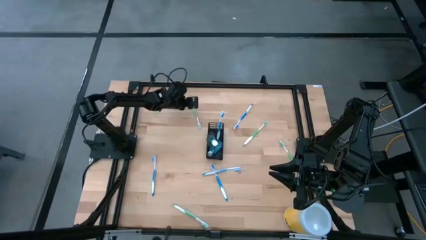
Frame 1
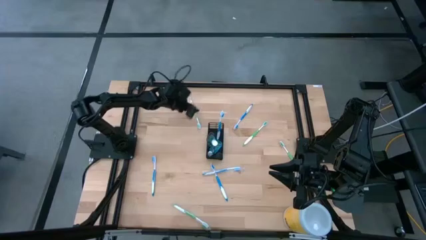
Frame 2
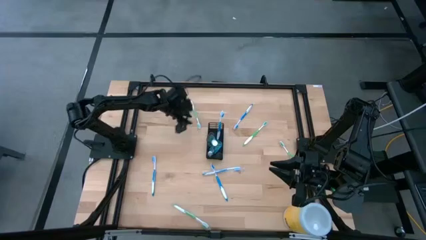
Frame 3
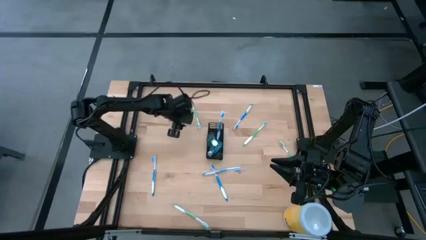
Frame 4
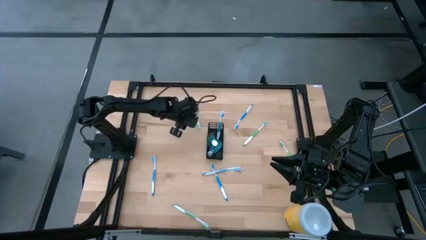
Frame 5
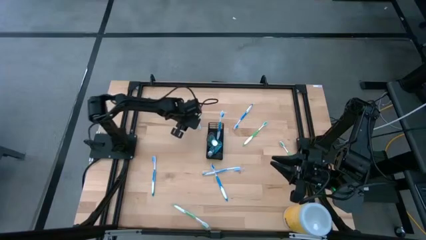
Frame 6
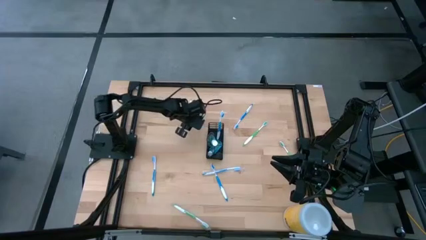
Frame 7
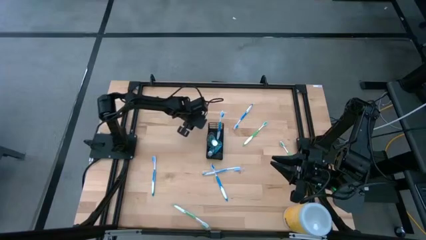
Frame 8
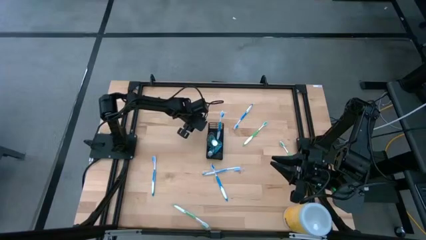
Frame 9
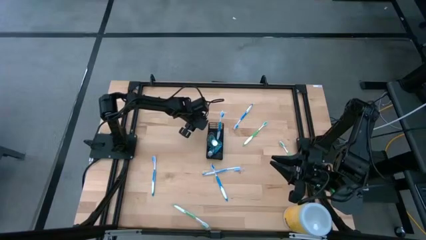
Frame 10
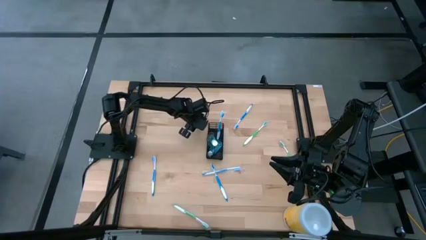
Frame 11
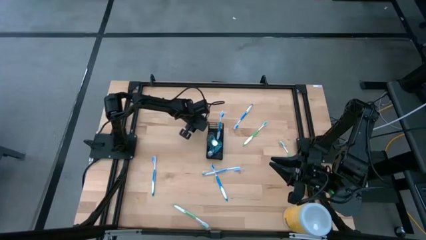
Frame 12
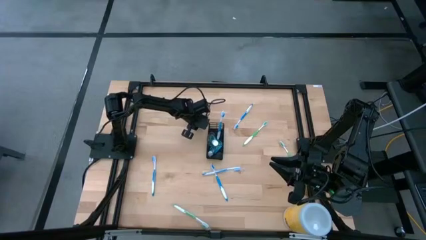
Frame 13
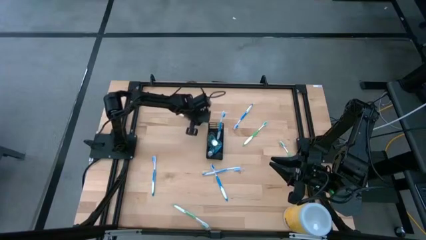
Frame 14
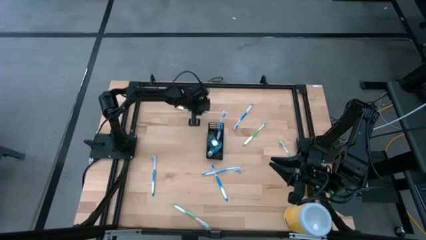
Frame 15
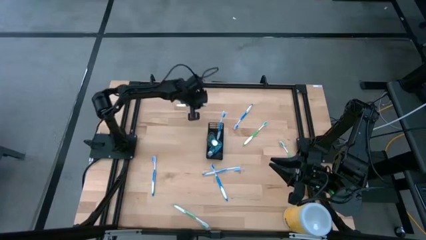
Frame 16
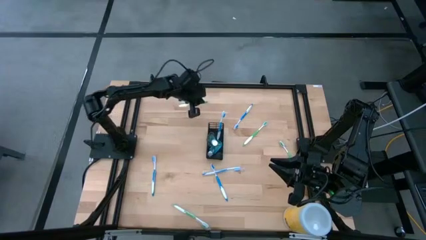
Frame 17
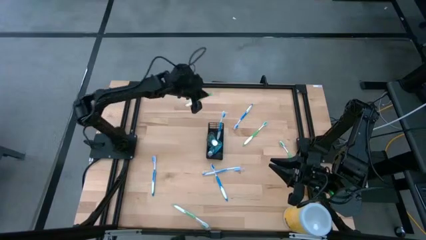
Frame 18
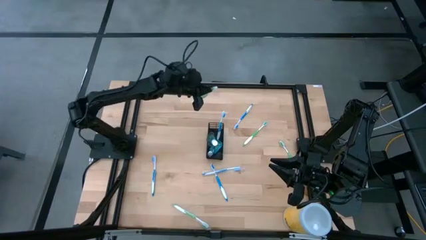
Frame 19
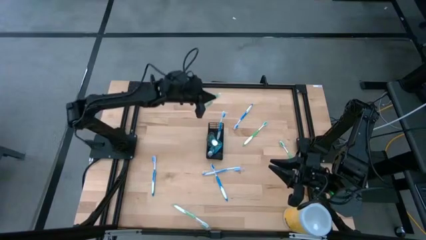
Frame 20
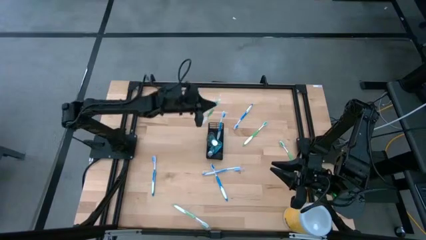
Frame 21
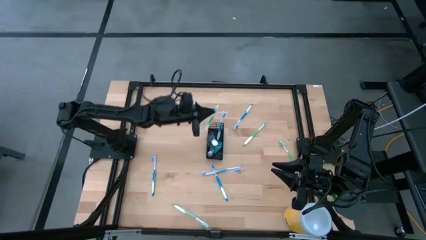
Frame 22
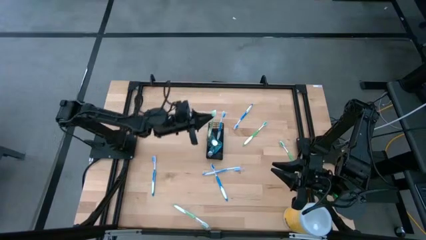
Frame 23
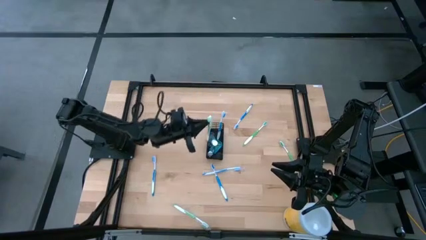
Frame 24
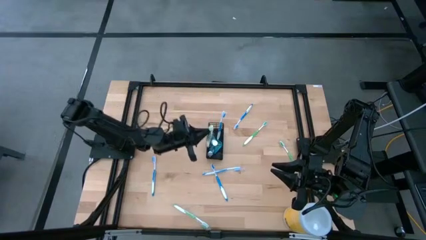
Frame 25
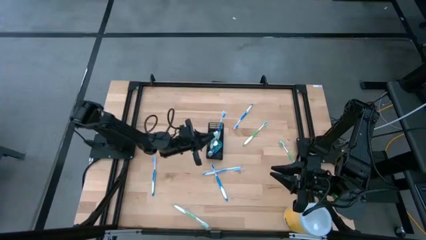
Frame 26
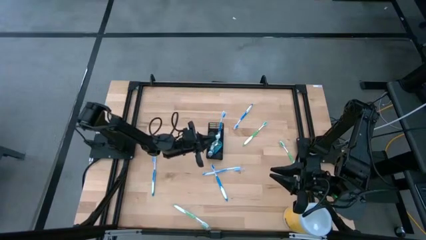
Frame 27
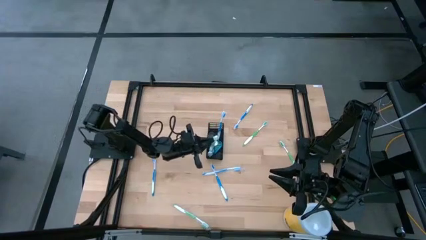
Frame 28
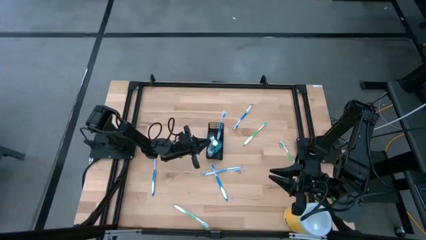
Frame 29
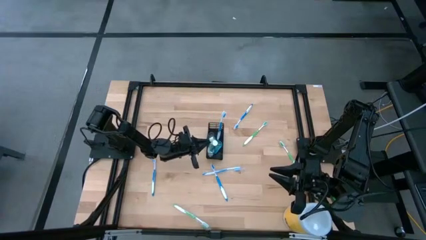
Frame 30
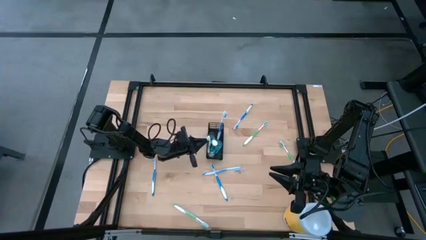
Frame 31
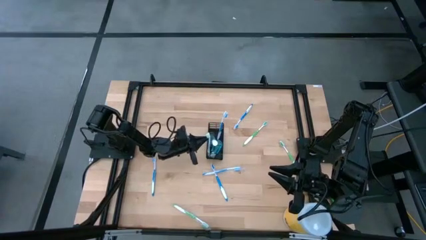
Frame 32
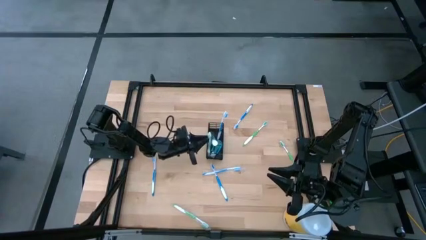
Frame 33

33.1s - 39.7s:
Task: Pick & Place toothbrushing station
Put the green toothbrush into the black organizer

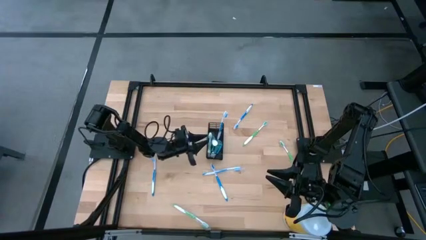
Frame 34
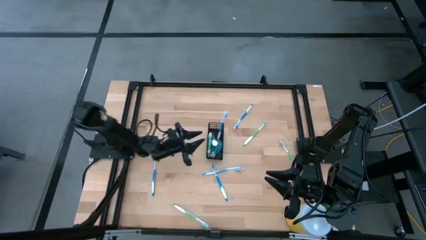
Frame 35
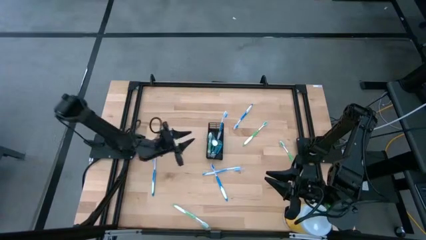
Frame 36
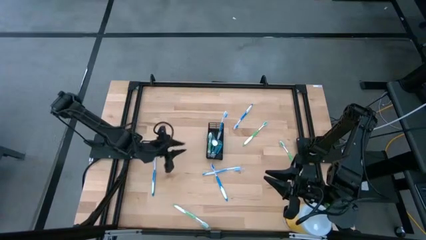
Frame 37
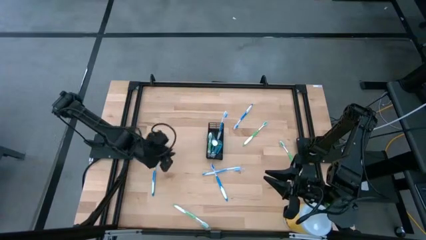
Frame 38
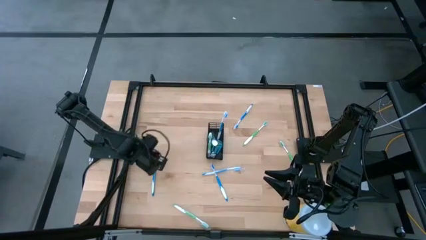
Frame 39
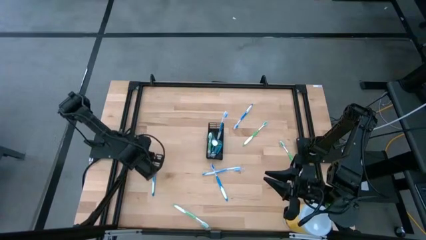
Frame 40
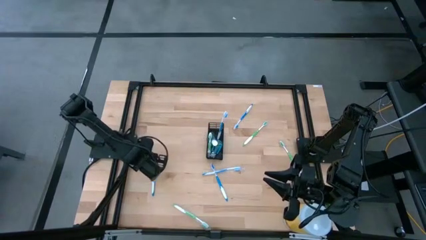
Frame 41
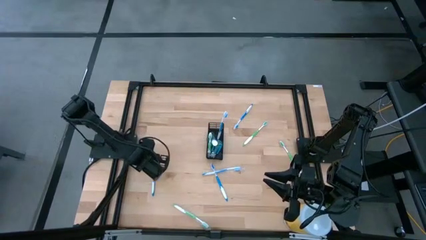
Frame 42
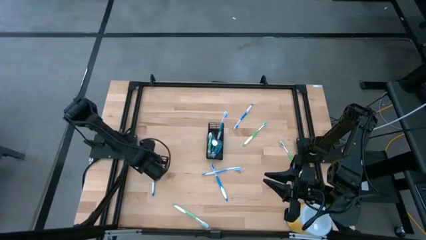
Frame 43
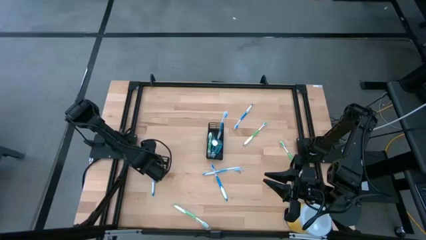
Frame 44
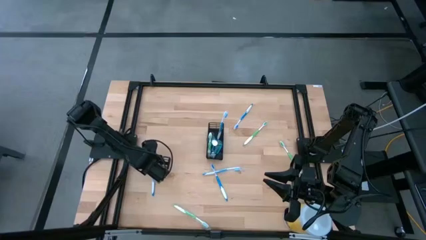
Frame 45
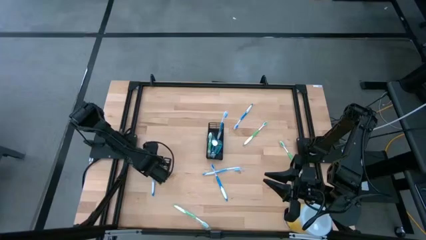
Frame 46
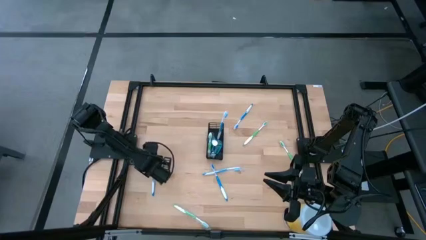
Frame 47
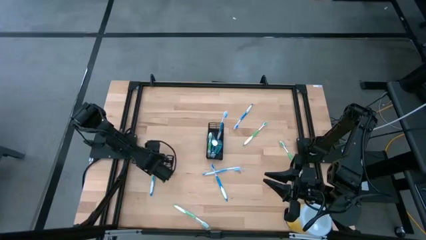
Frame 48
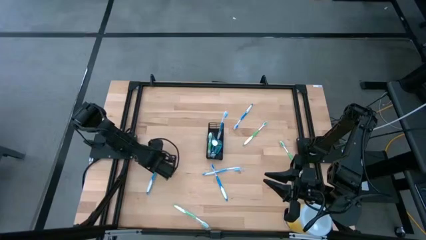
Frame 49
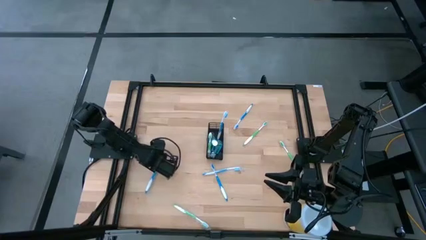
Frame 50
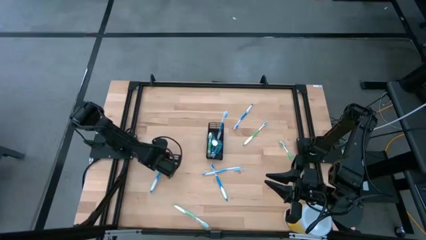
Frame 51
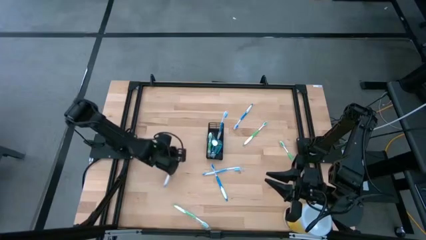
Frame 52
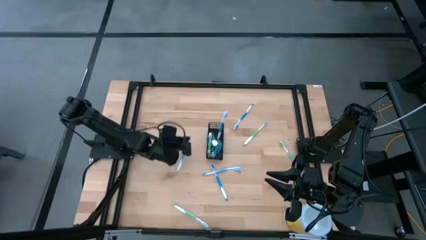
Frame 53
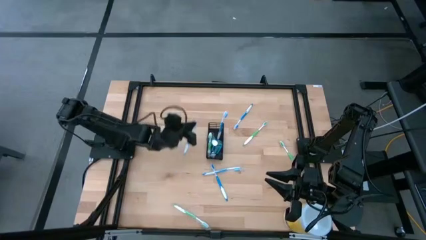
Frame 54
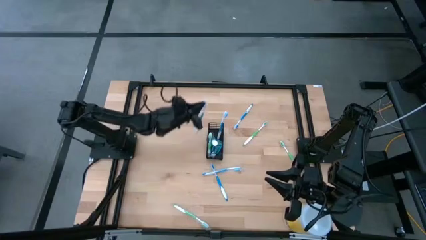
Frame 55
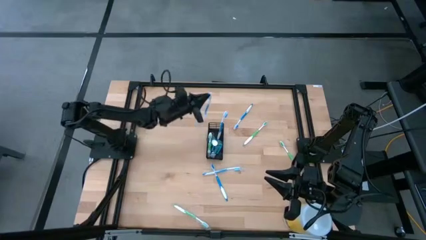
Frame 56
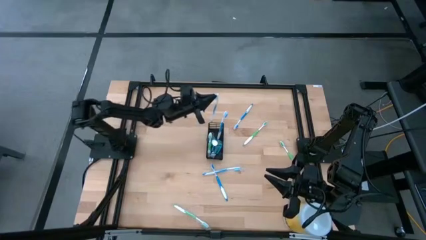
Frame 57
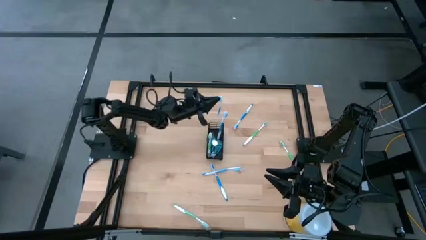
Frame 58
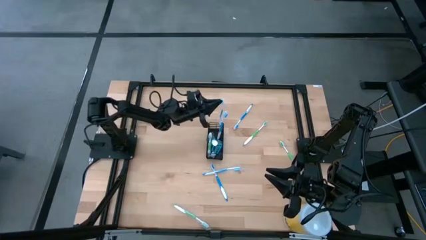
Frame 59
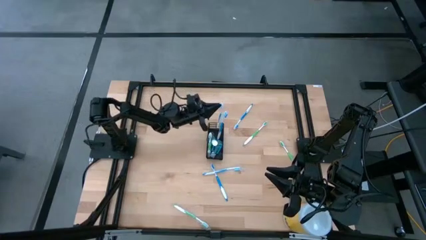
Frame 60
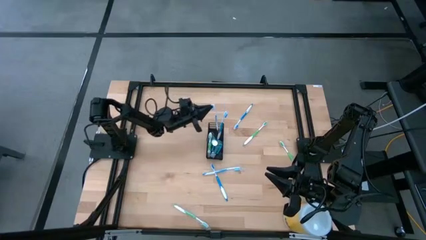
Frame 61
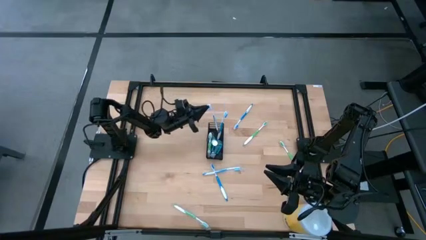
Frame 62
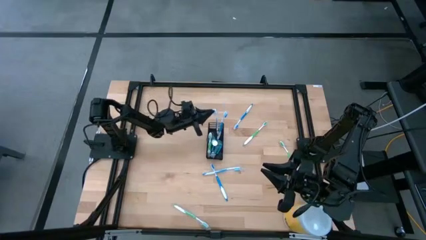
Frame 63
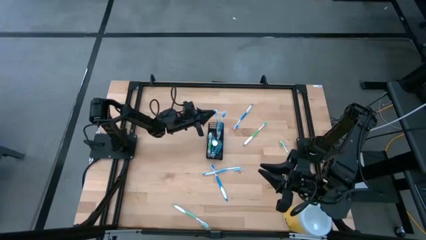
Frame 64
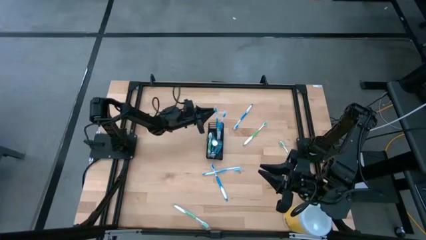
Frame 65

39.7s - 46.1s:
Put the blue toothbrush into the black organizer

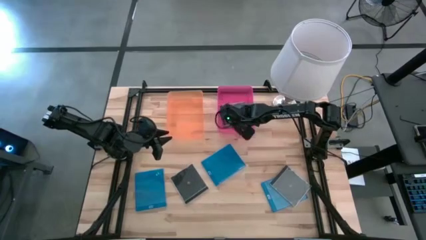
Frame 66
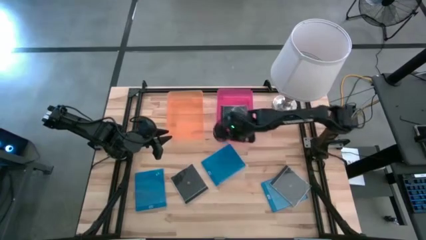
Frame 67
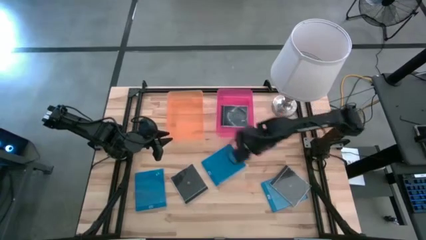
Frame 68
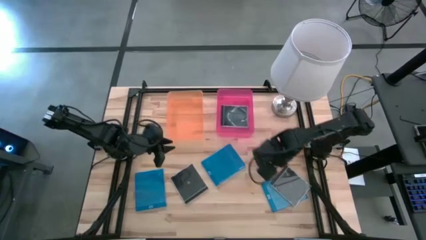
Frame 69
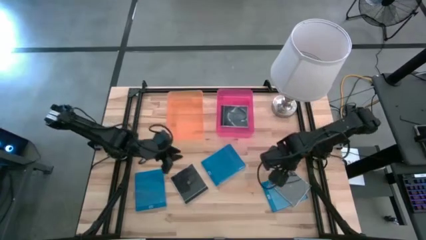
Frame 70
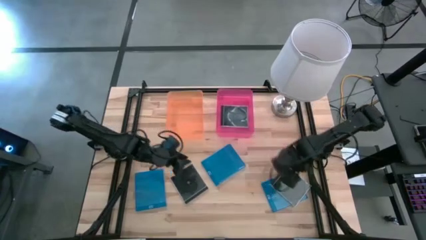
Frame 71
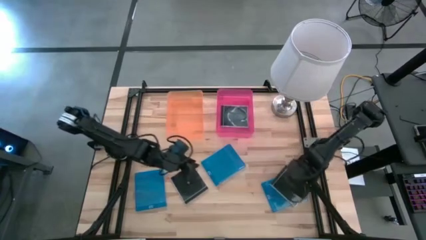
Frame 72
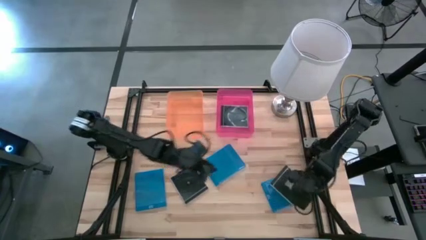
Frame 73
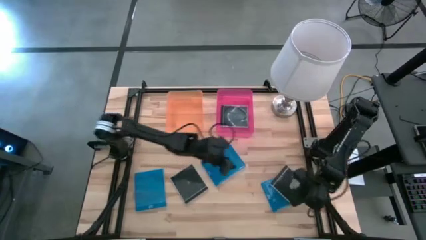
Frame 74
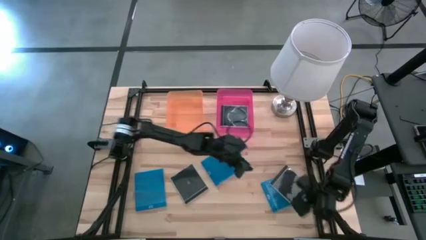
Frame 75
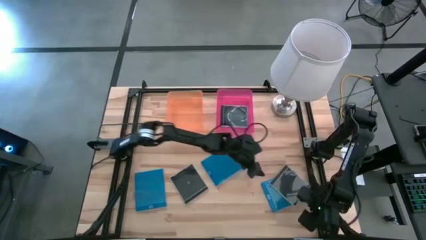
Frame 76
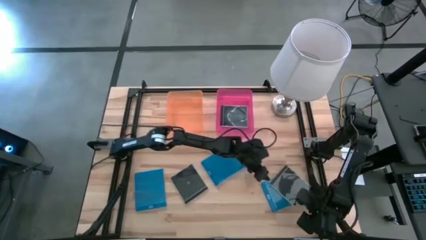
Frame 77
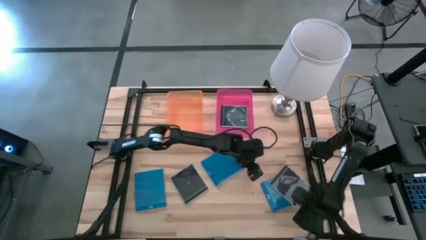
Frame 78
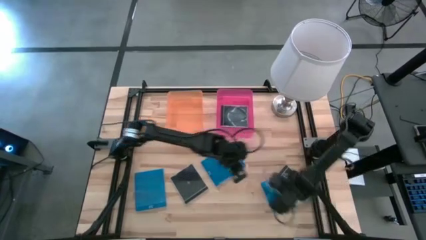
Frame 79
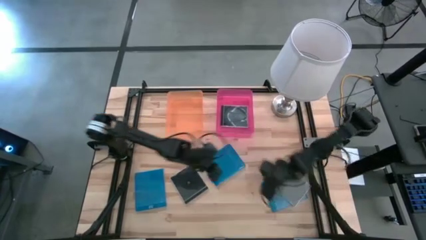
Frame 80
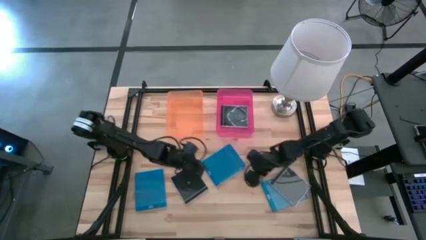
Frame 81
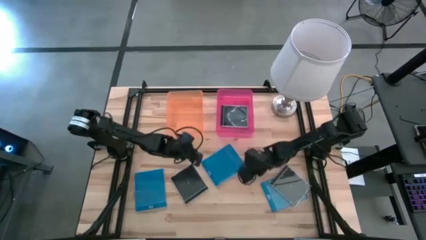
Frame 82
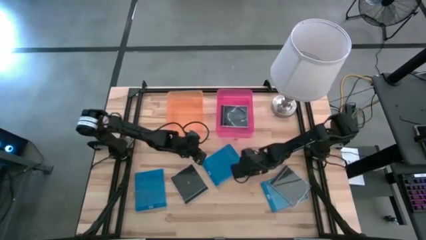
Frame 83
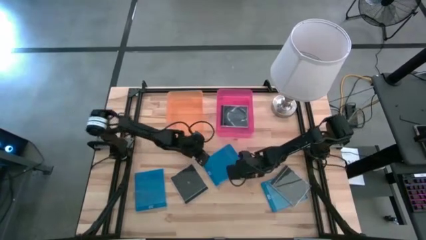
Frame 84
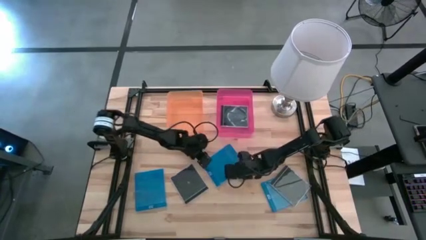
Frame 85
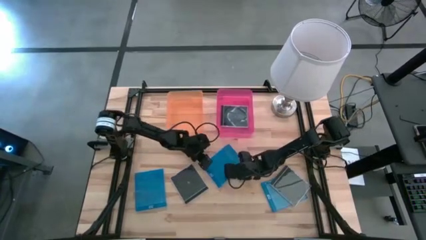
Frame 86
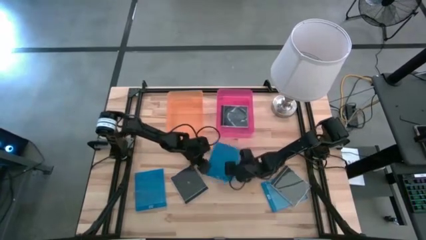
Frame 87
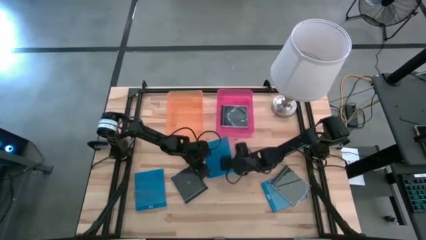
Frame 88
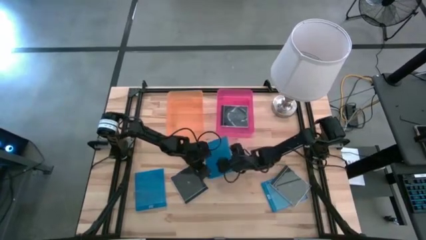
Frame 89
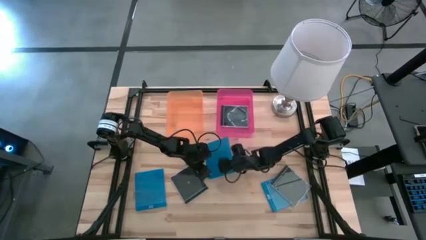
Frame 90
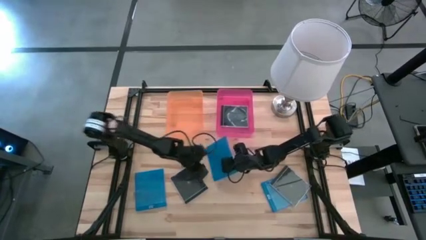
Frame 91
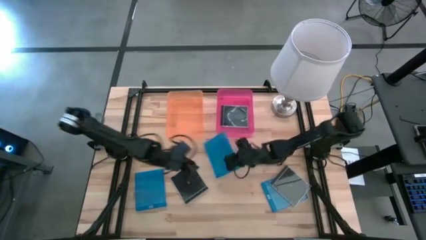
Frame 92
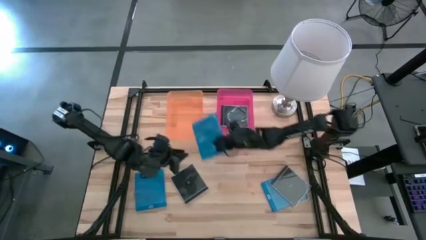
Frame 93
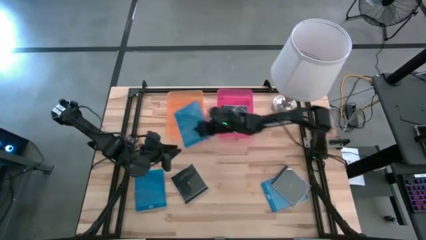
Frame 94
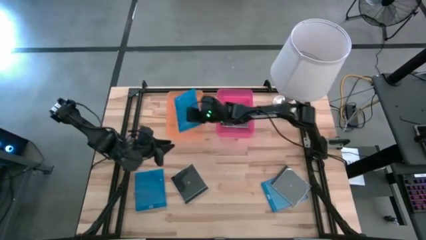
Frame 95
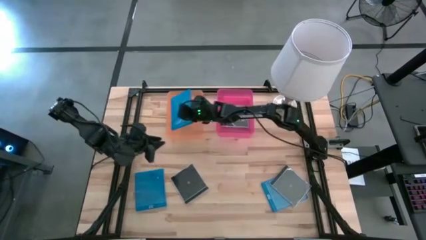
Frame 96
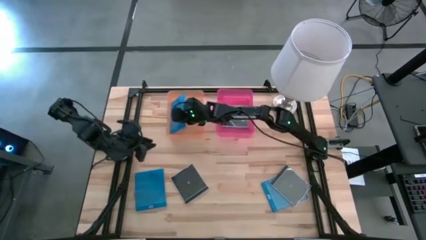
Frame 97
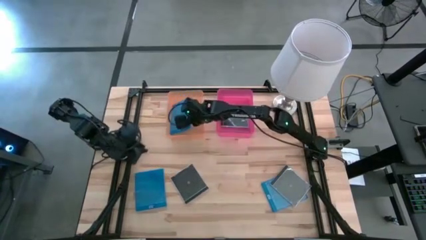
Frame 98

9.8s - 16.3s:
Task: Pick & place jewel cases by type
Put the center blue CD case into the orange bin
